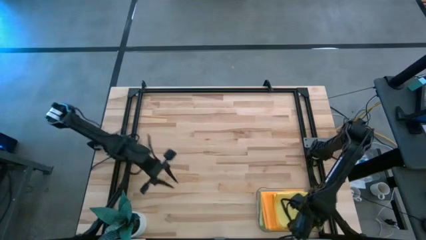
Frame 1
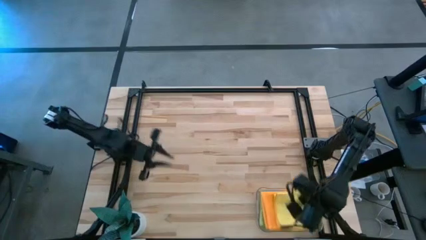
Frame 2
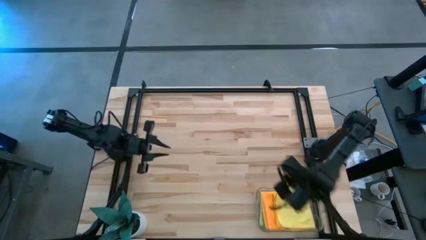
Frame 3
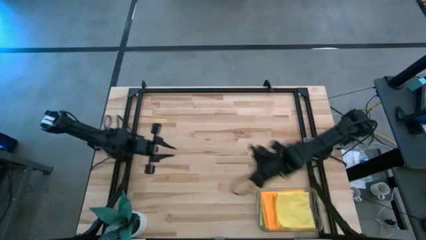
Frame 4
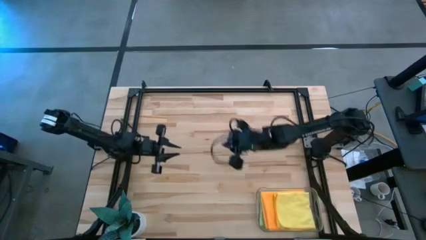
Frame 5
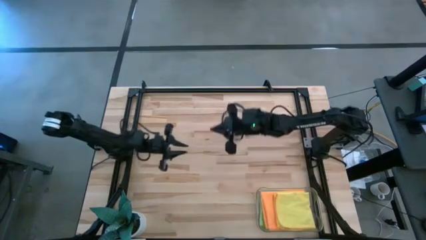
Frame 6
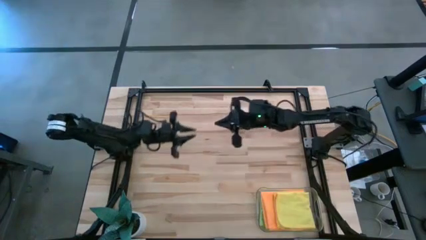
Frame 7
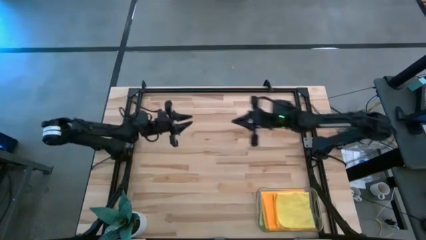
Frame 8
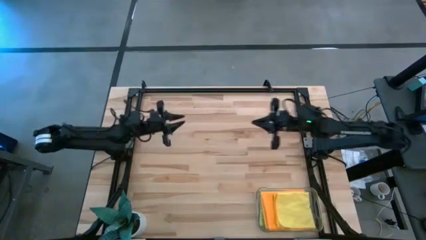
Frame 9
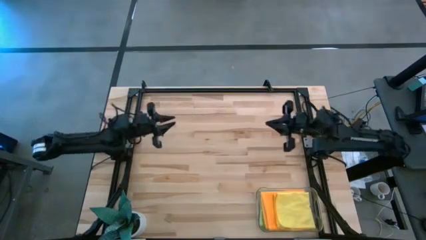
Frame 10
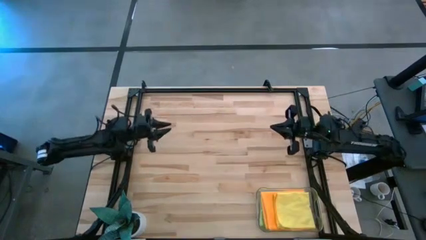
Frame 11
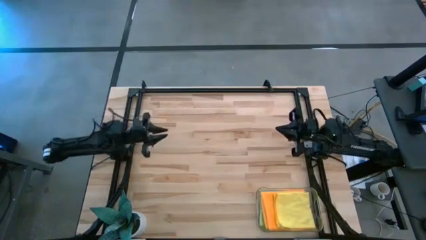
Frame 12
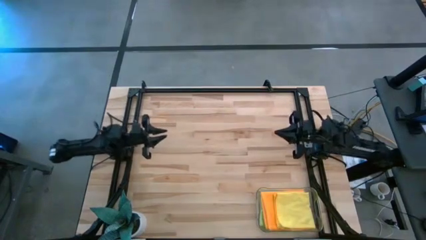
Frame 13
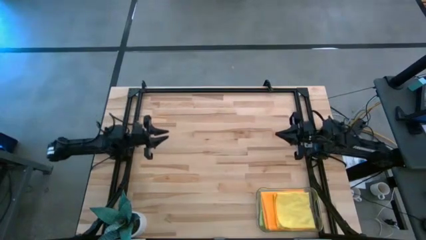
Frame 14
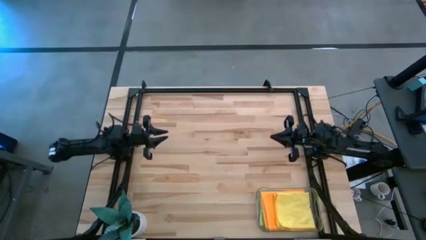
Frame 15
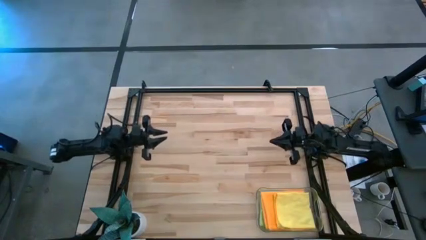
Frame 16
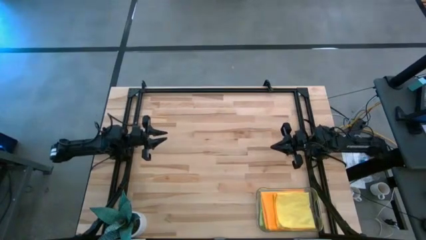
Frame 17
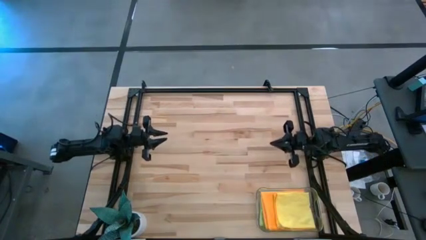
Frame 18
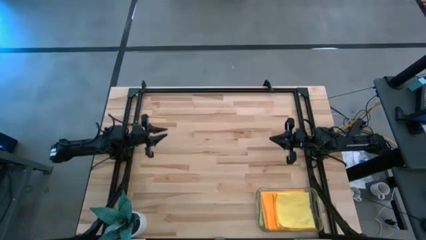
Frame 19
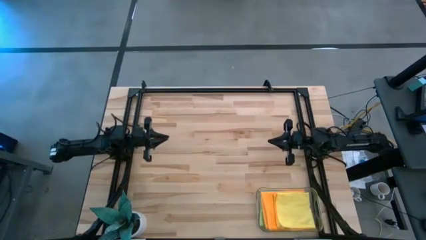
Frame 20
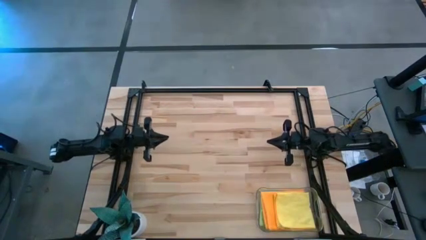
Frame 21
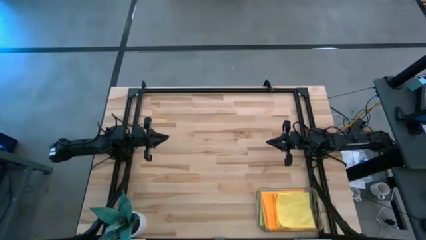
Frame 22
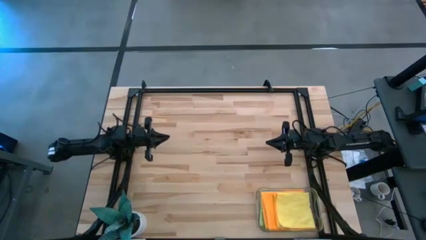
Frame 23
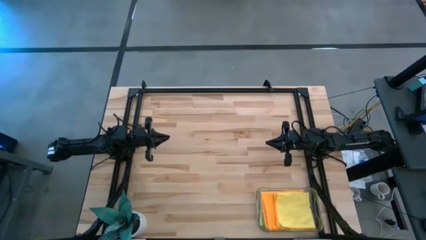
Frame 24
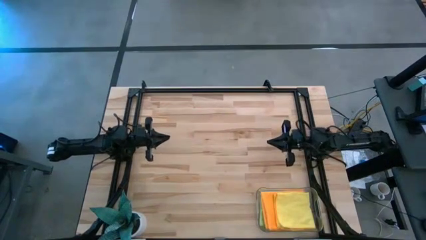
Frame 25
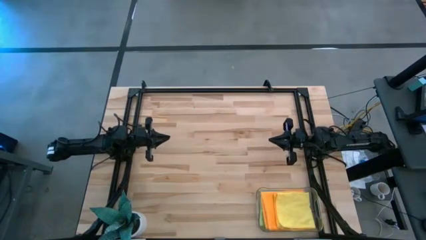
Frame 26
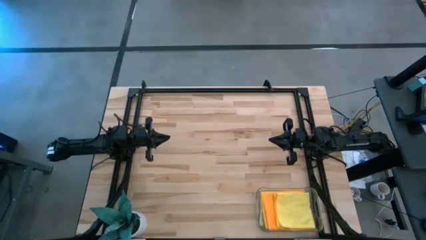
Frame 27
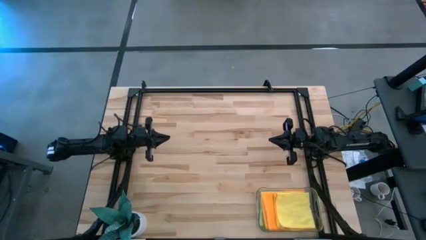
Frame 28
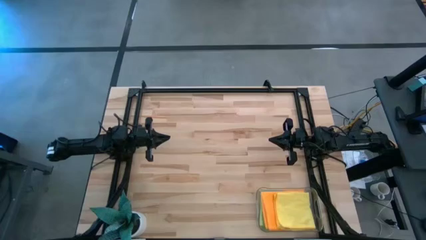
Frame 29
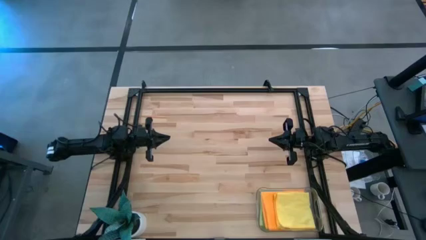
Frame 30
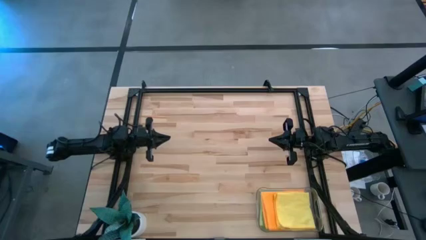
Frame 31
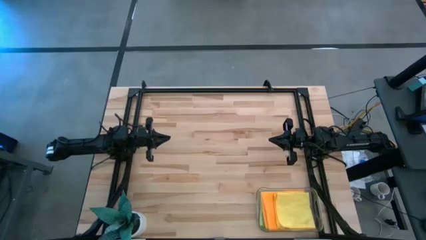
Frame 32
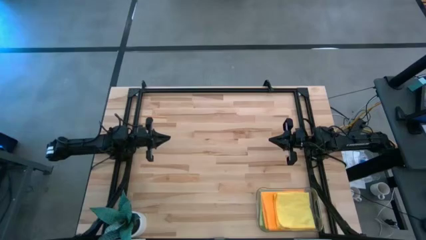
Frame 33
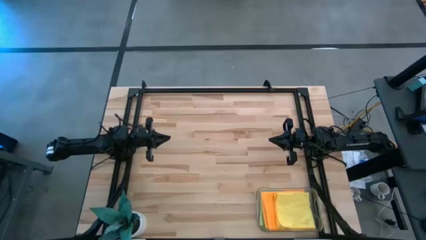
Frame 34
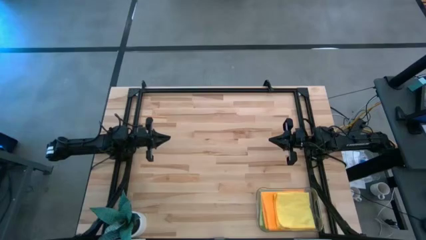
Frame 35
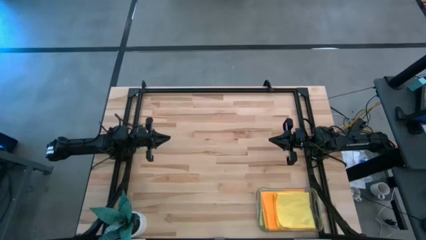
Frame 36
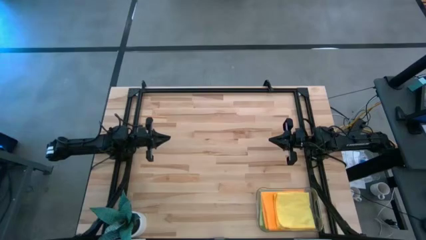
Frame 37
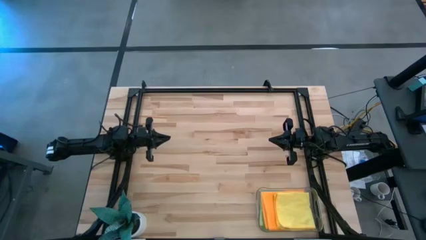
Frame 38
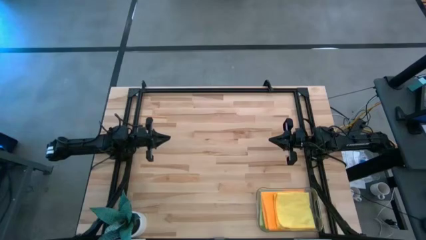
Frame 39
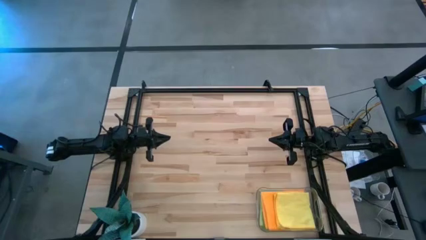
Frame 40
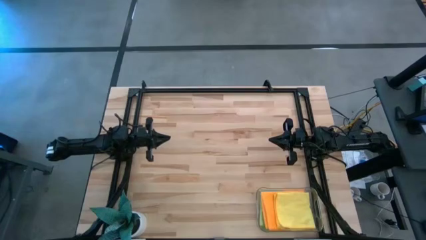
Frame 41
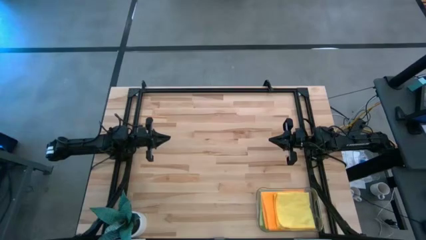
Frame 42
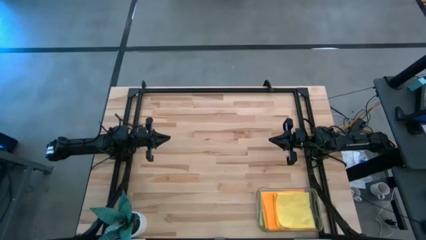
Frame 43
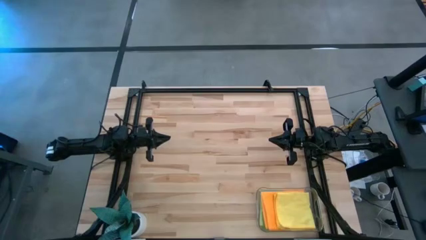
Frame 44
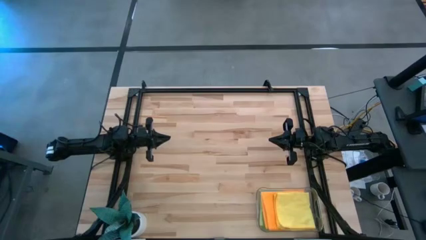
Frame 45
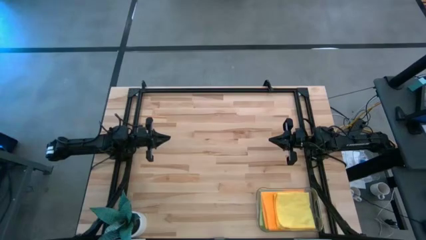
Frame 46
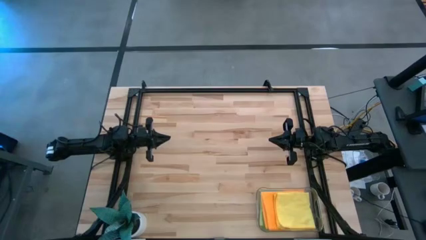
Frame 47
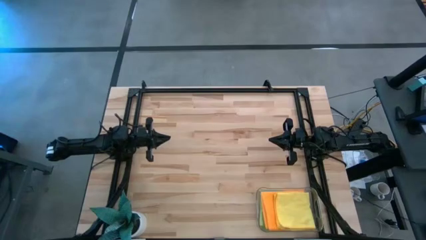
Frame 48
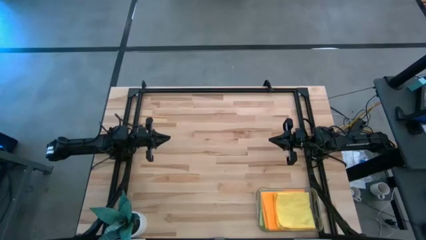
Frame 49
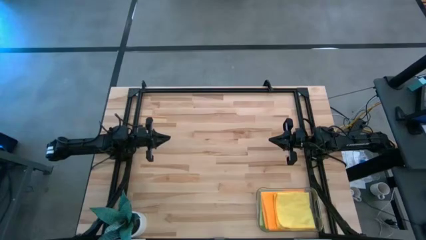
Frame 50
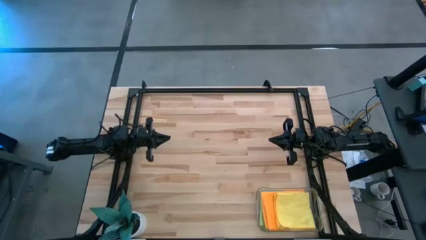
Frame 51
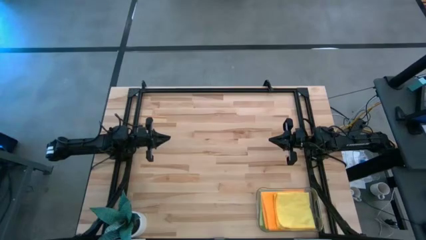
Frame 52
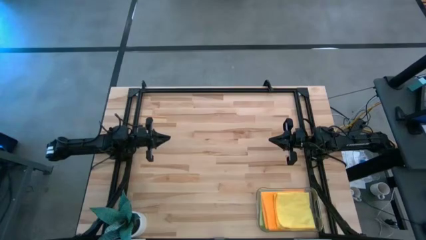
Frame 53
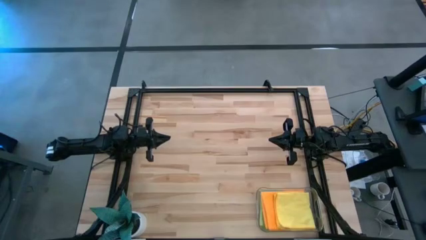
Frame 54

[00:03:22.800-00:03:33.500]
Task: Fold microfiber towels
Return to Home Position
